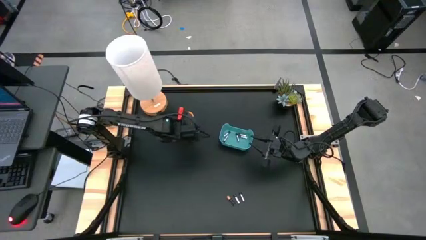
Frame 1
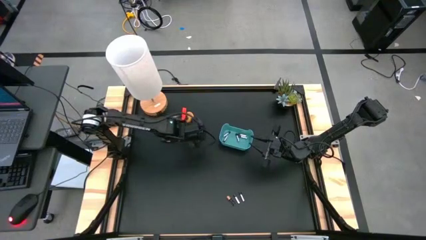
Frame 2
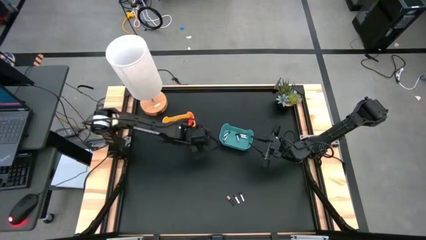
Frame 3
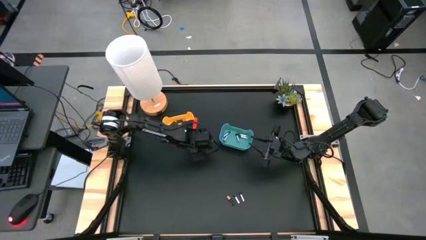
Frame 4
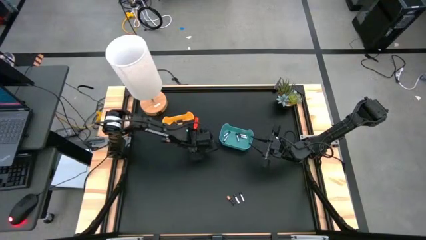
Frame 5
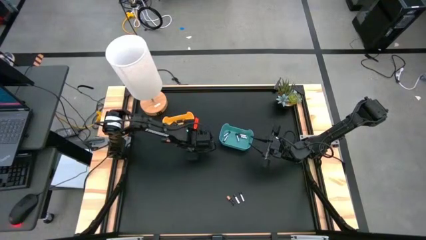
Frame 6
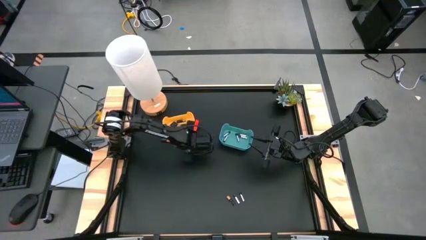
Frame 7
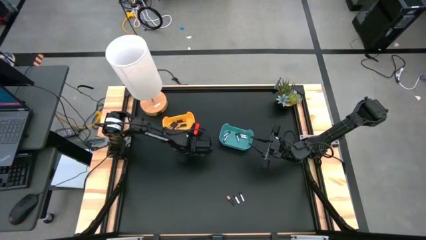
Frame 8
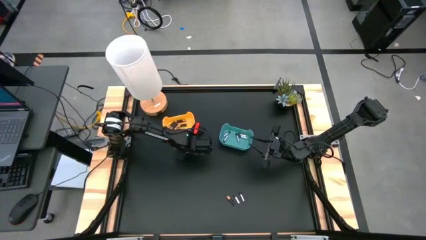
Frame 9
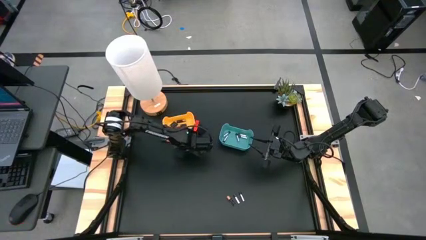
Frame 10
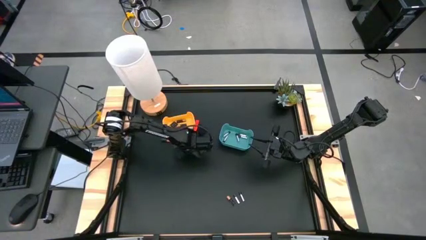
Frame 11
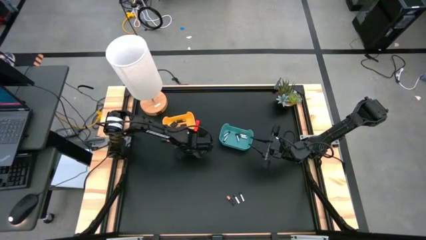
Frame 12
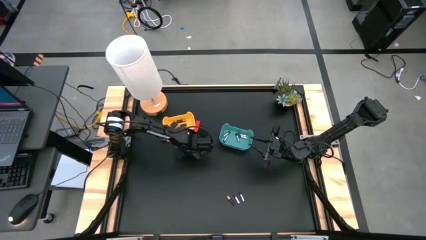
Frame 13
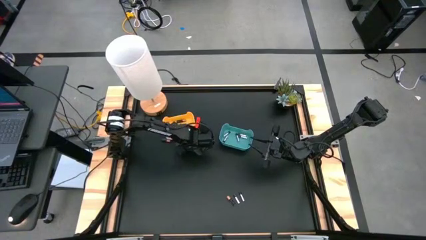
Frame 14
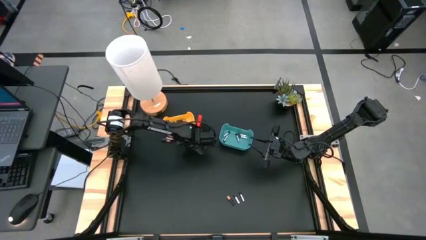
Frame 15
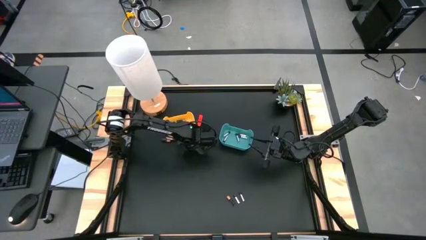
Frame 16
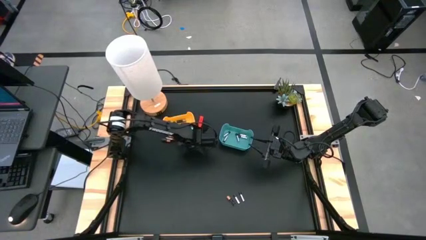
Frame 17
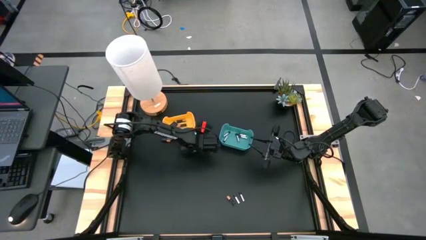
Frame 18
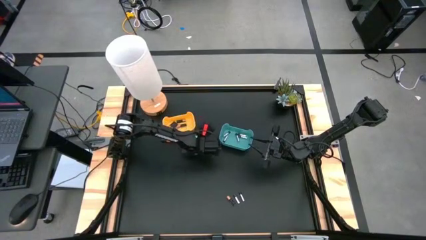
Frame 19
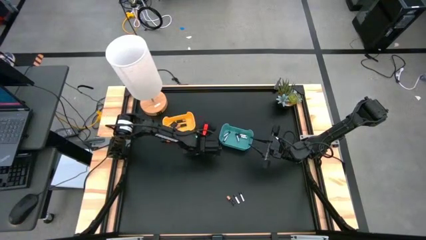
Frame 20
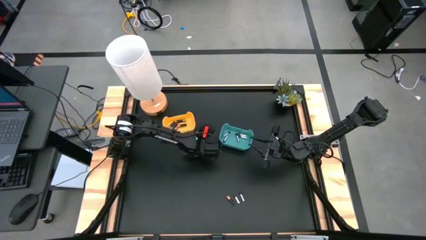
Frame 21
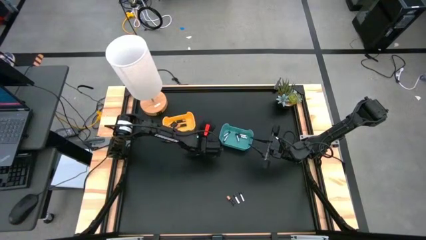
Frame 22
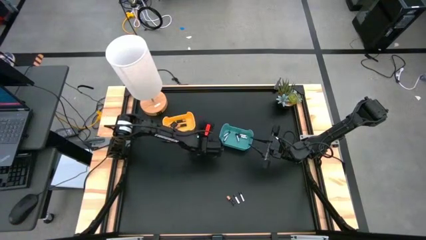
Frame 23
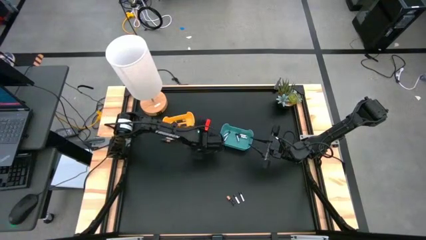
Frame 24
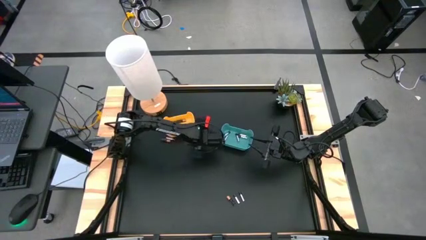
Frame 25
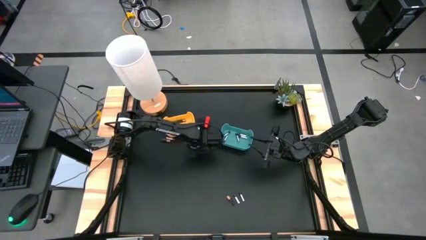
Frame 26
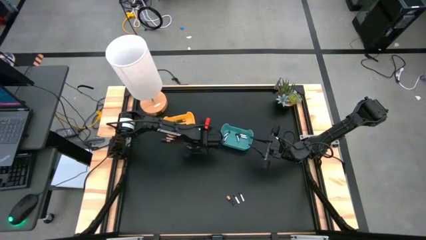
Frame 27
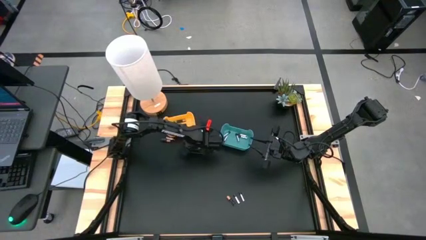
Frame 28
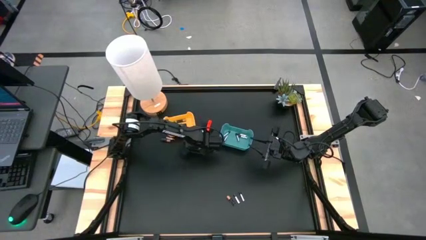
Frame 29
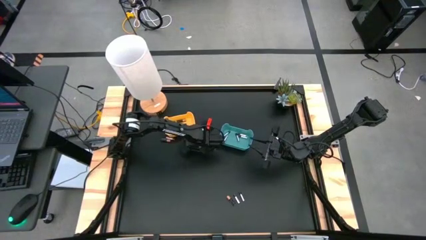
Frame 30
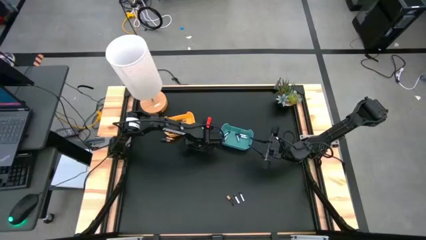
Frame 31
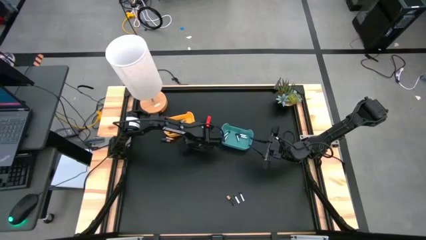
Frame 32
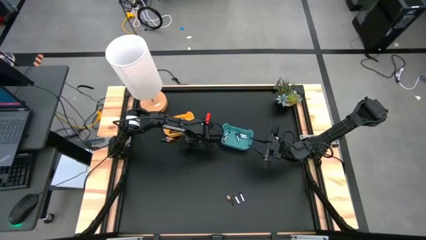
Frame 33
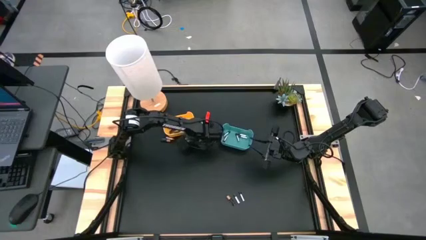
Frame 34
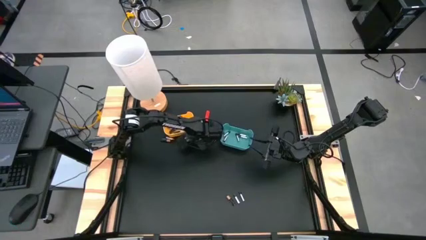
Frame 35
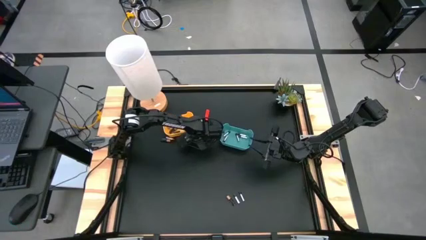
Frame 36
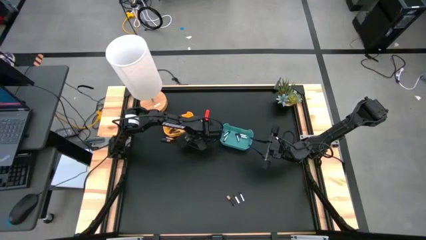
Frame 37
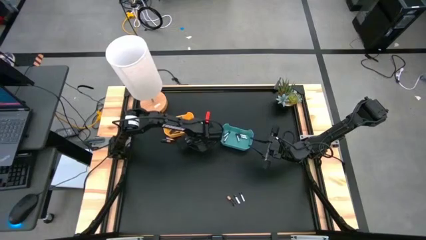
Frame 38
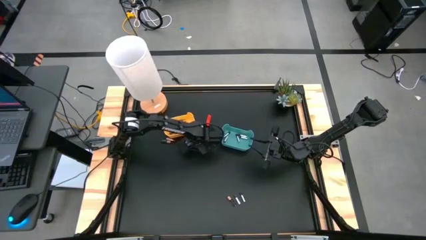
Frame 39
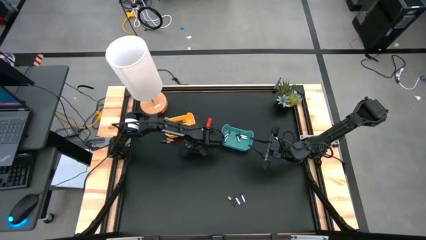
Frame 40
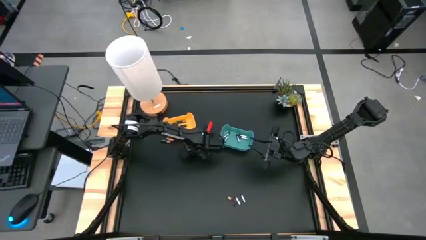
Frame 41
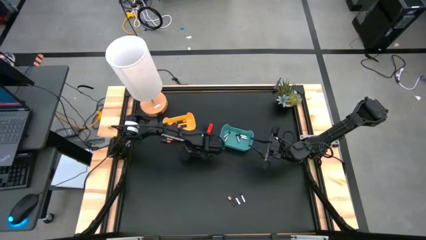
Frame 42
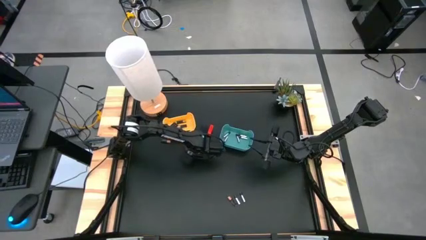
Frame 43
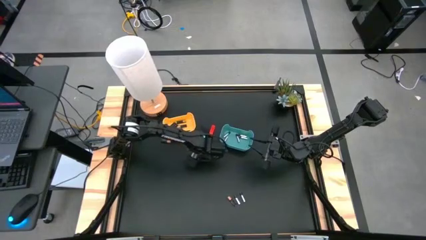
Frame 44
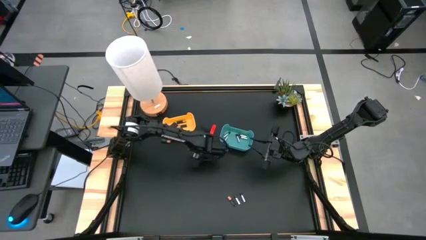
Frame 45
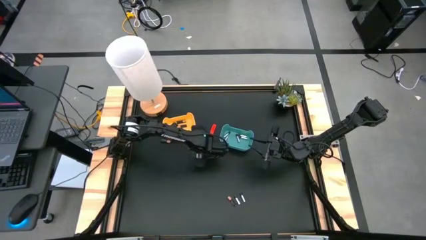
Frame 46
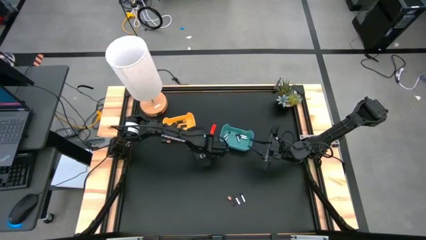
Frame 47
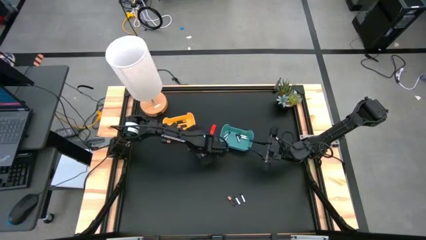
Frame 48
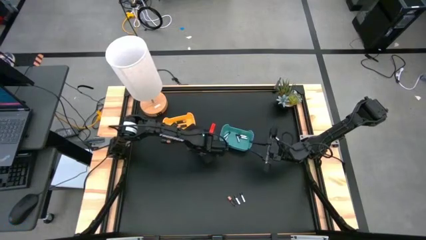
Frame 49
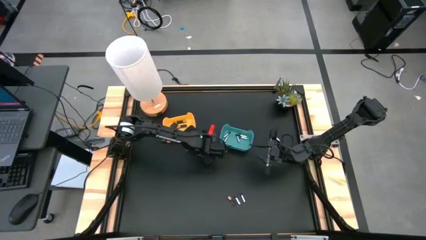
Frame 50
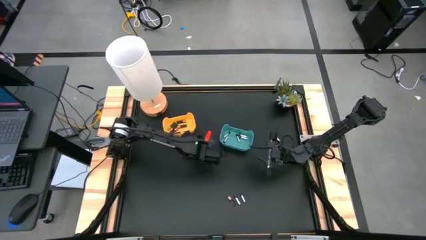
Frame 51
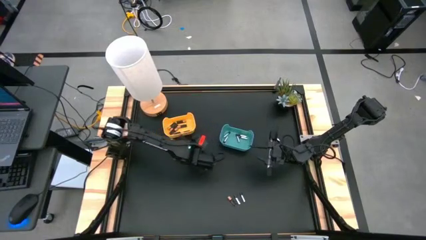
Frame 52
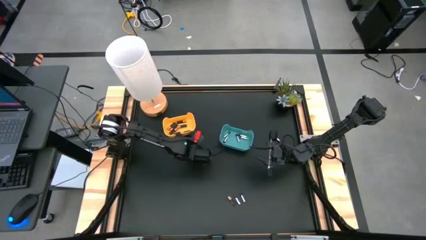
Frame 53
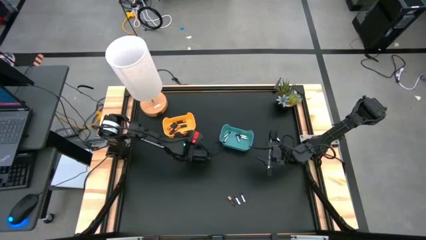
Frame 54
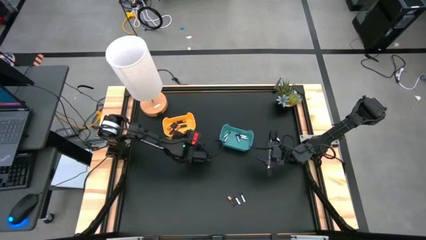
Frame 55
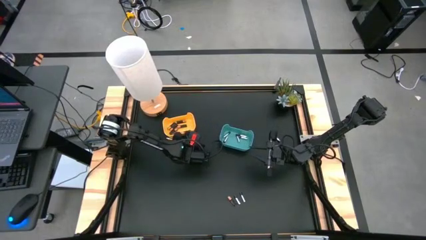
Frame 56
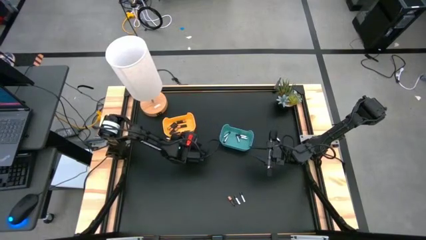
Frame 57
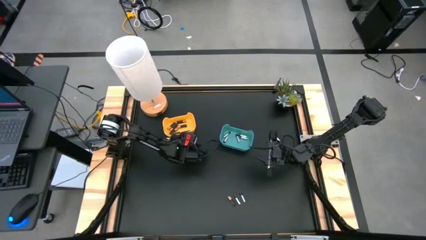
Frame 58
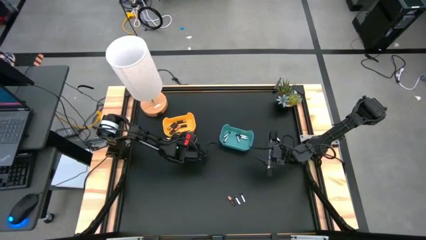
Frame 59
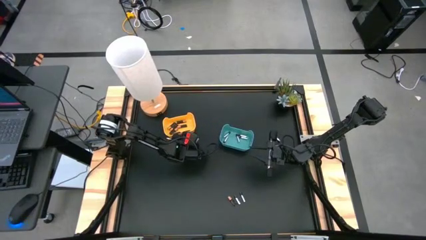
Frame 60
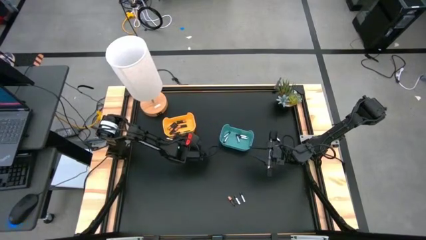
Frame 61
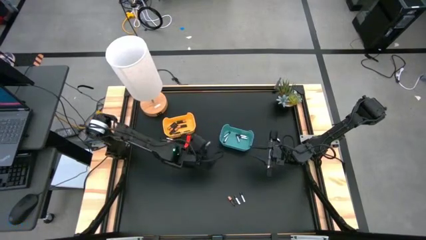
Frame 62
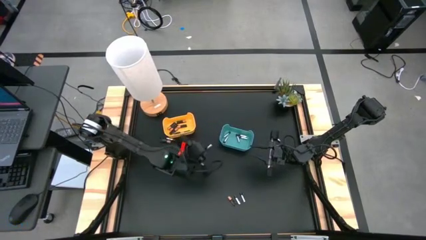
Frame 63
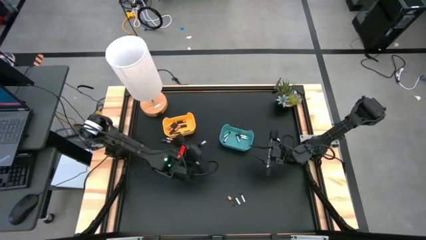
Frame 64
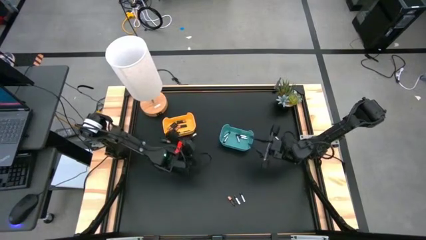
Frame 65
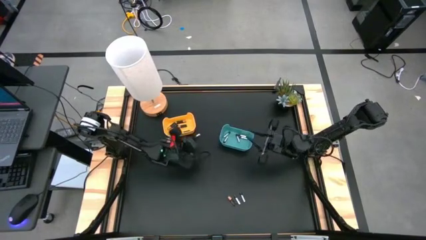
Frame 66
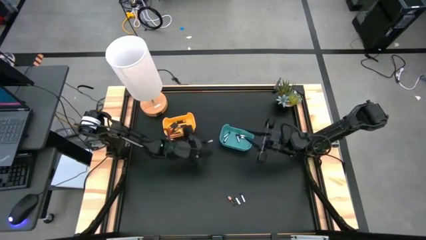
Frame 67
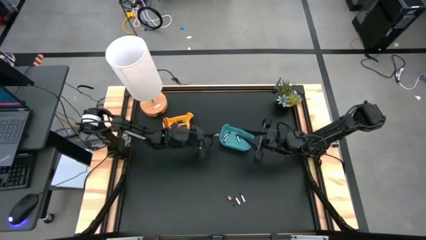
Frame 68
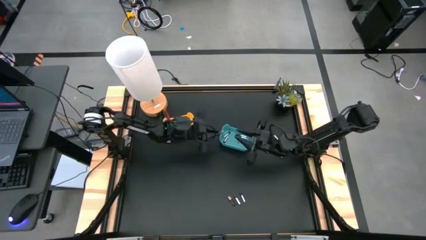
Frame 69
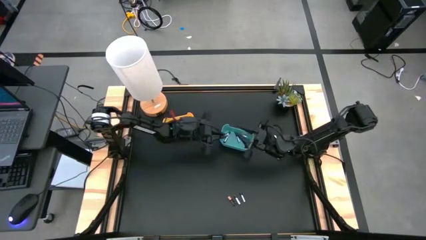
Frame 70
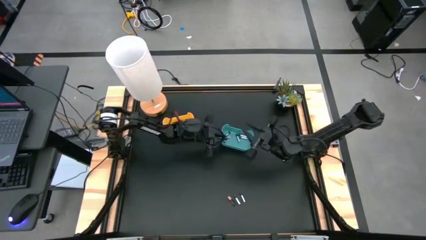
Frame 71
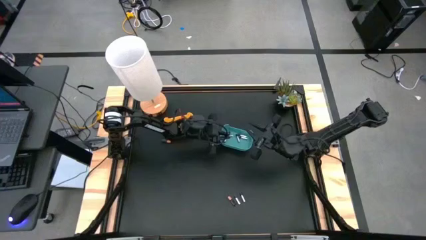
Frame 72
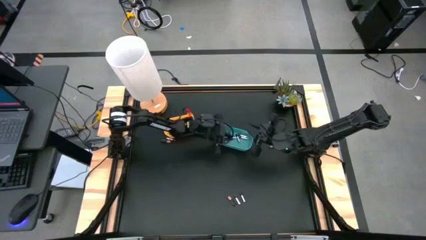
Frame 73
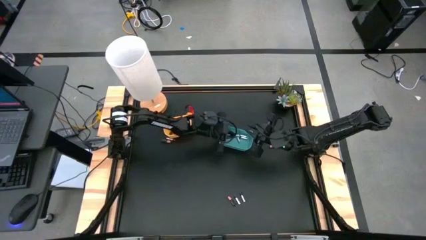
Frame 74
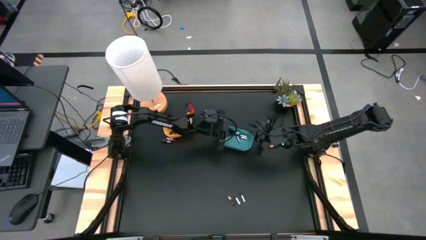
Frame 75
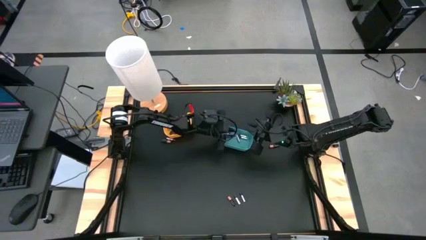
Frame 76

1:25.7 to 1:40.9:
Task: Sort batteries
Put the silver battery into the blue bin
